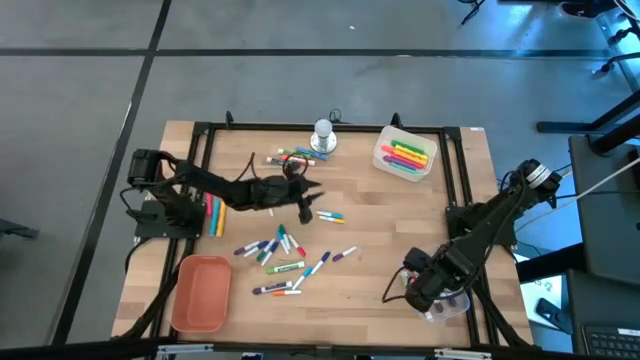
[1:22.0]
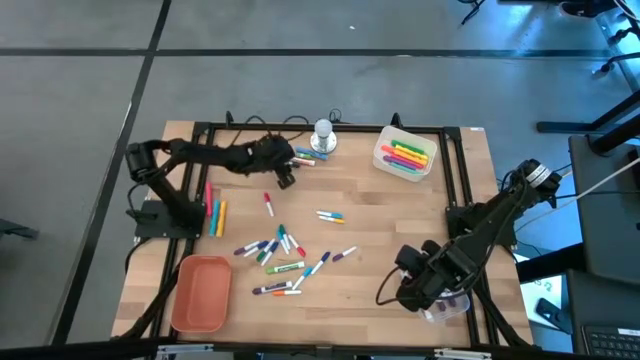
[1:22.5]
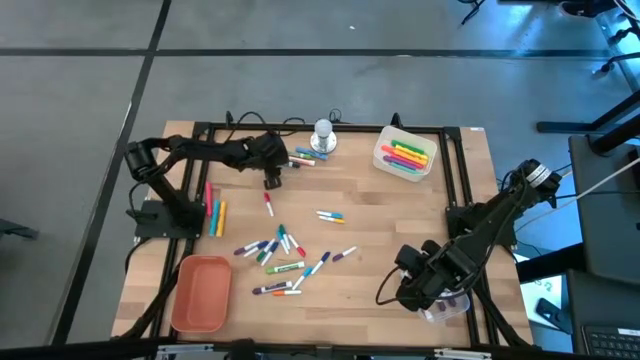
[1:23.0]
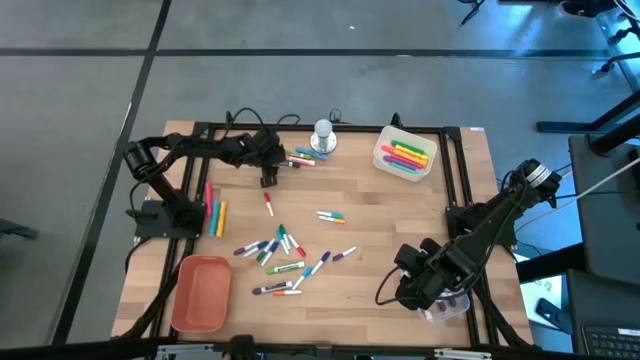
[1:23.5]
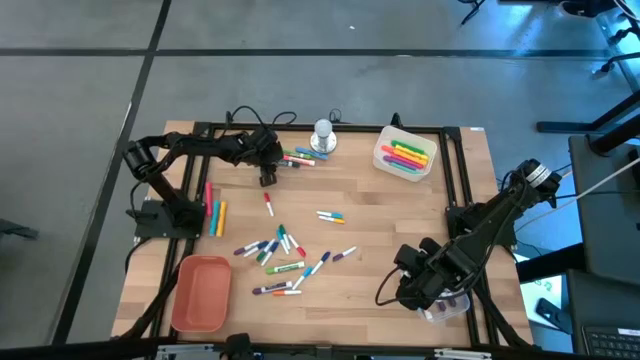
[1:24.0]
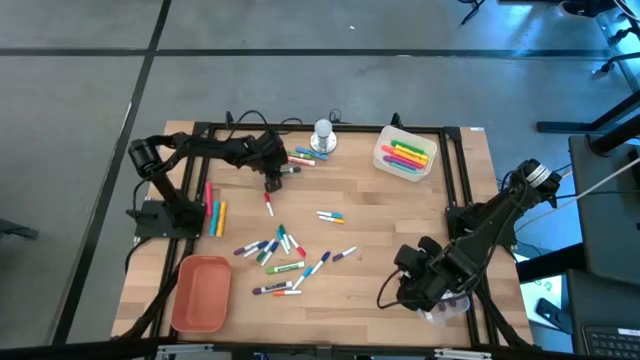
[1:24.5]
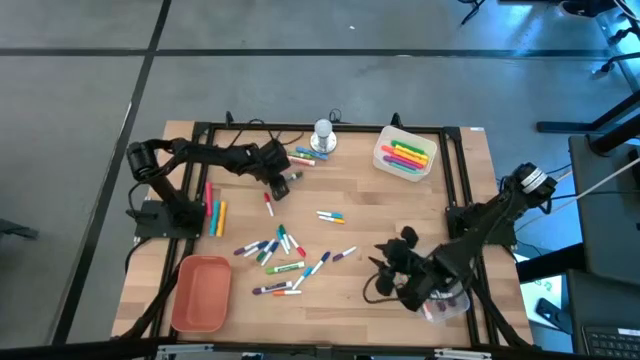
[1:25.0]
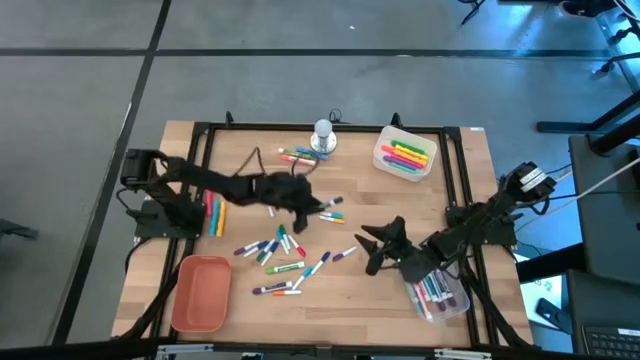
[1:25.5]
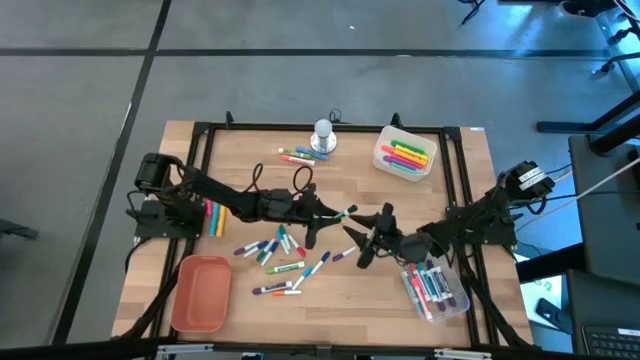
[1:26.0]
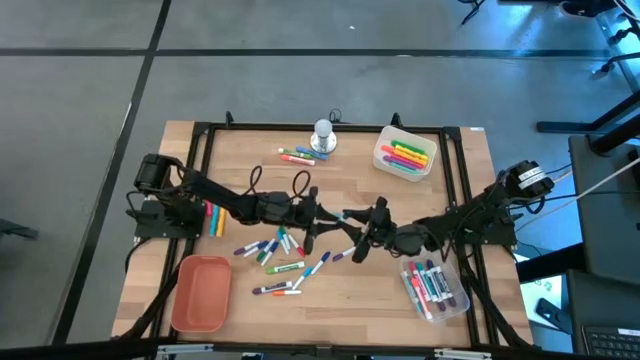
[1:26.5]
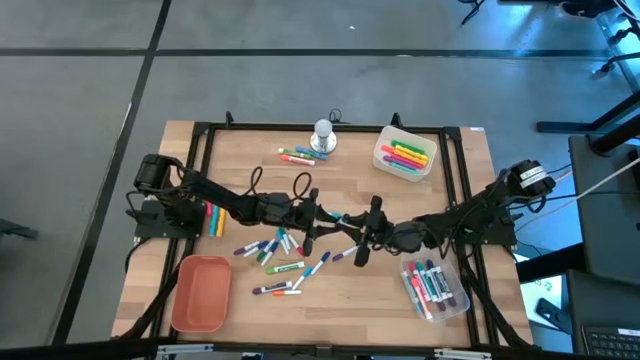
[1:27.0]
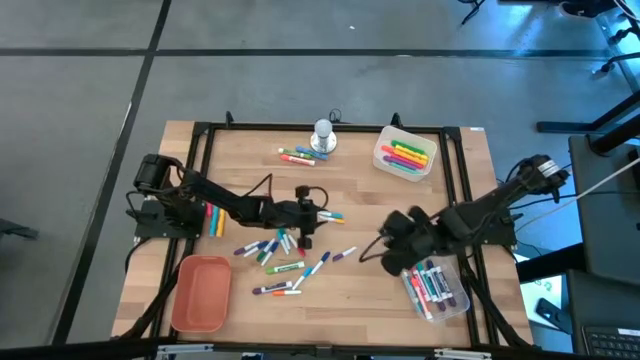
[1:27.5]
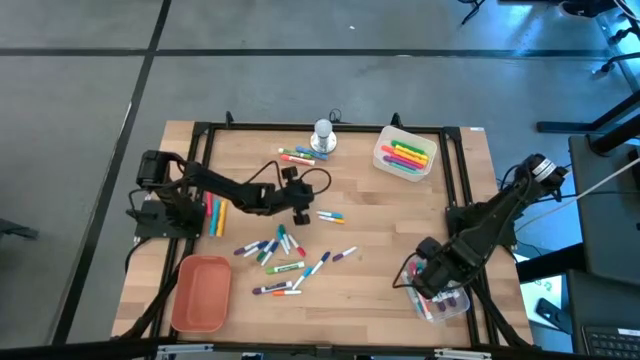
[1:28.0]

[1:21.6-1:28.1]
Task: Pick & Place Markers
Put the medium green marker pen into the transparent bin

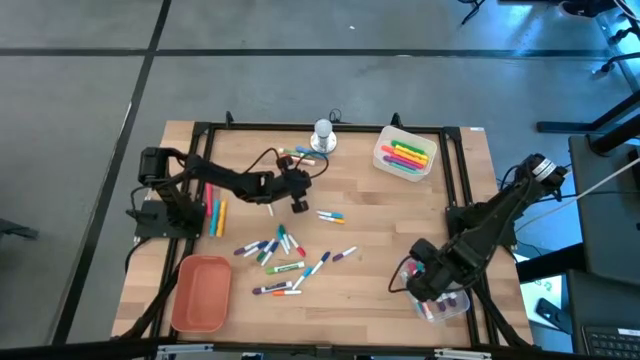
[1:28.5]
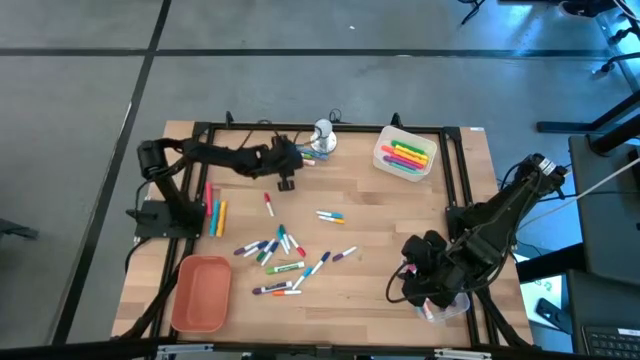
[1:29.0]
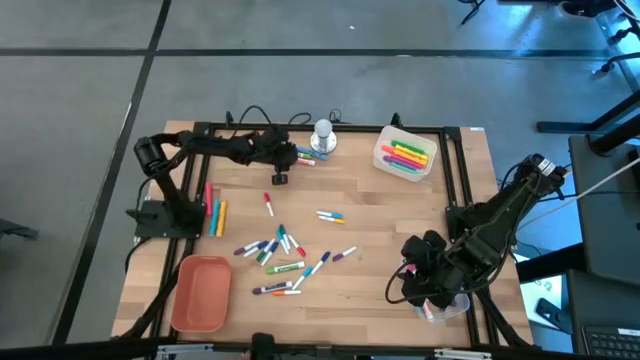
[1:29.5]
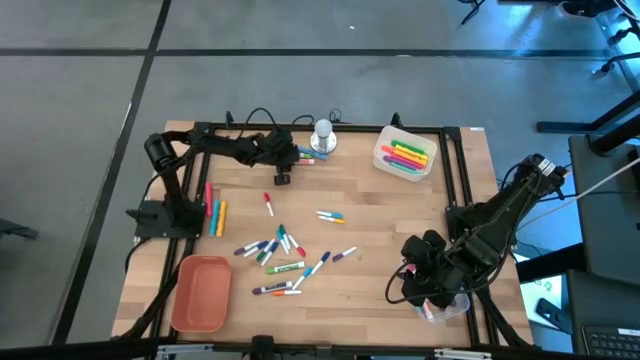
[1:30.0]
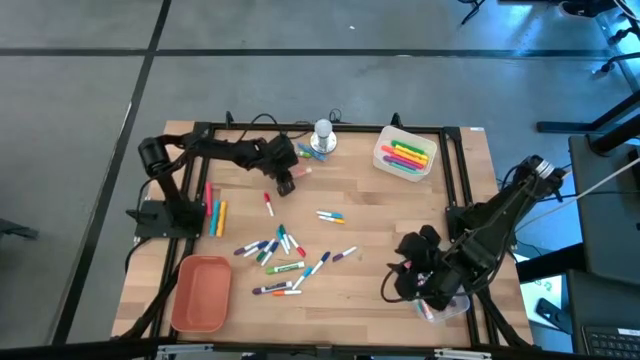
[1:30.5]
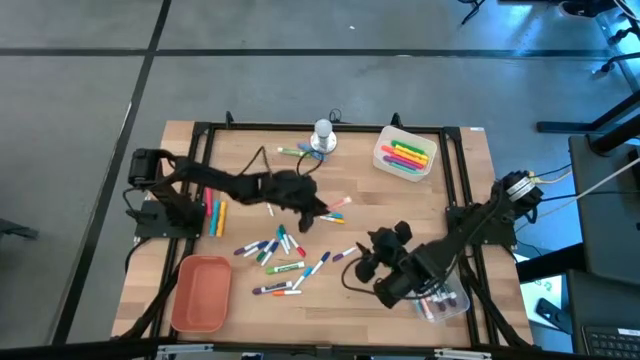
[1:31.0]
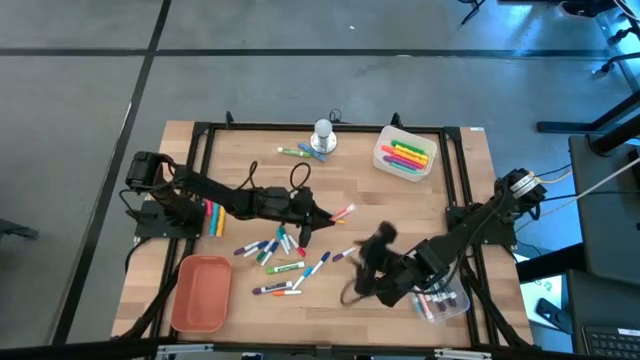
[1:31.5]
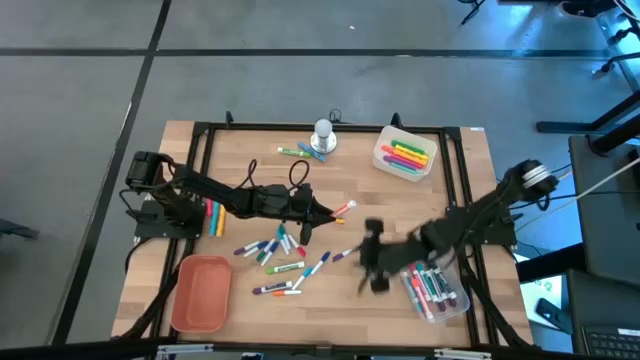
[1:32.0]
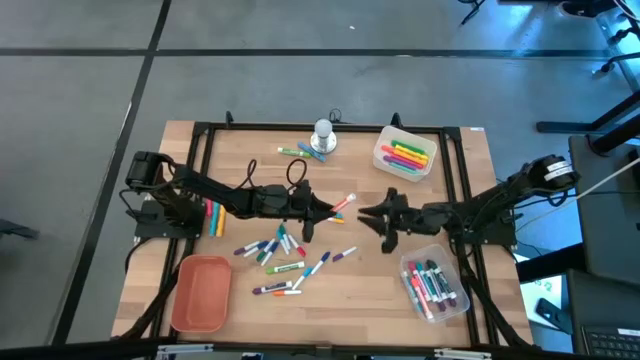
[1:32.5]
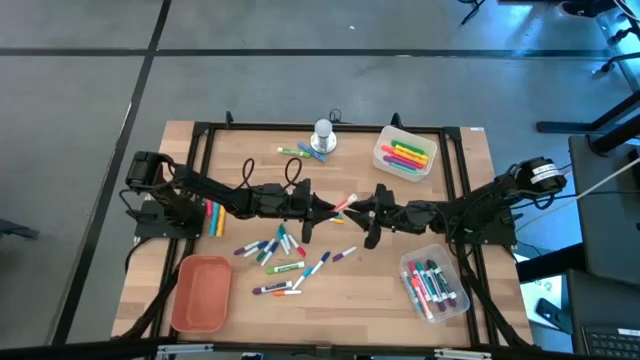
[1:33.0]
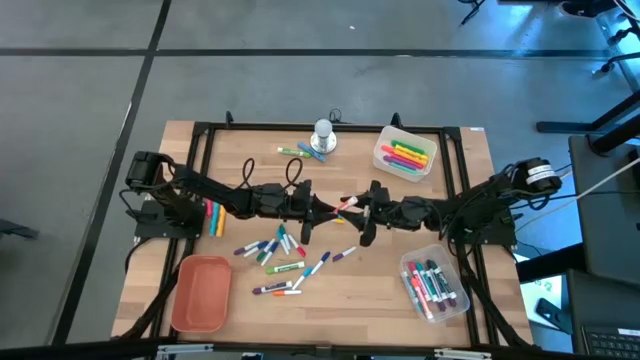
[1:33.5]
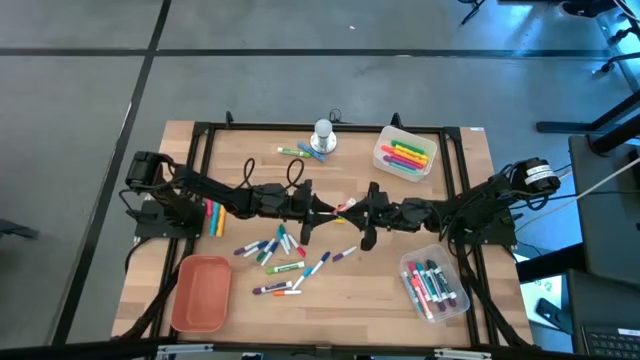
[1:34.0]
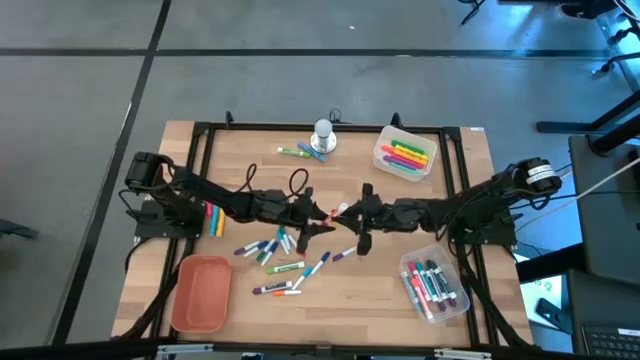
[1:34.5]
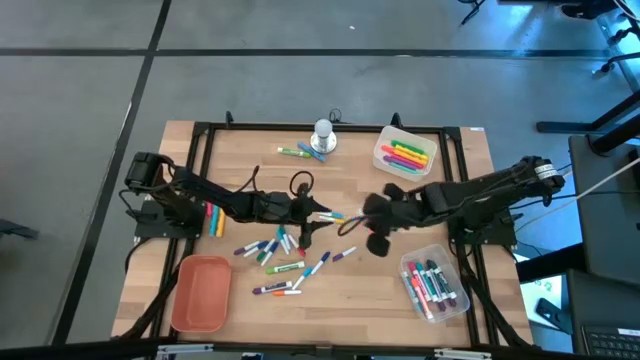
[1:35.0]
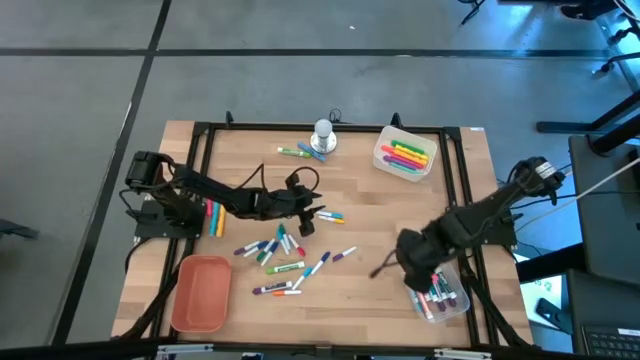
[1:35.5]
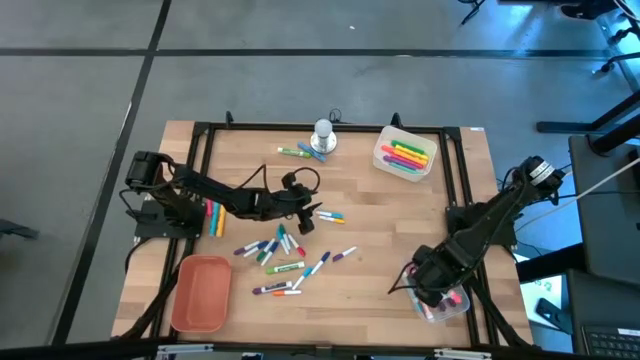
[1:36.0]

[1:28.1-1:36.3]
Put the medium orange marker pen into the transparent bin

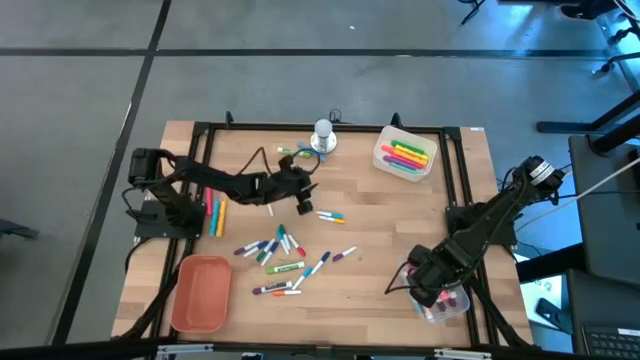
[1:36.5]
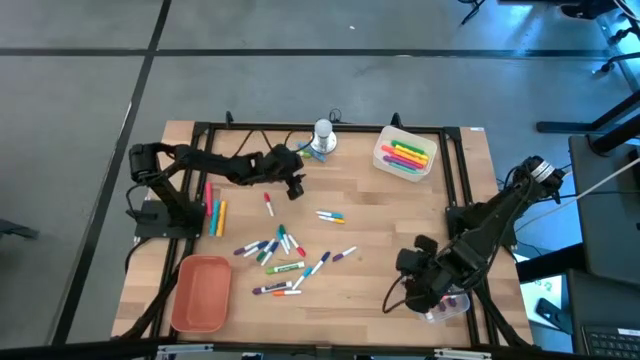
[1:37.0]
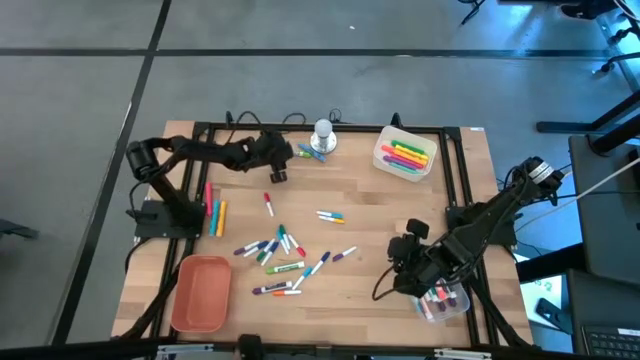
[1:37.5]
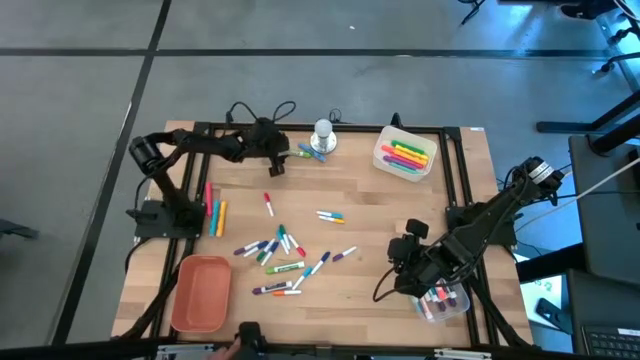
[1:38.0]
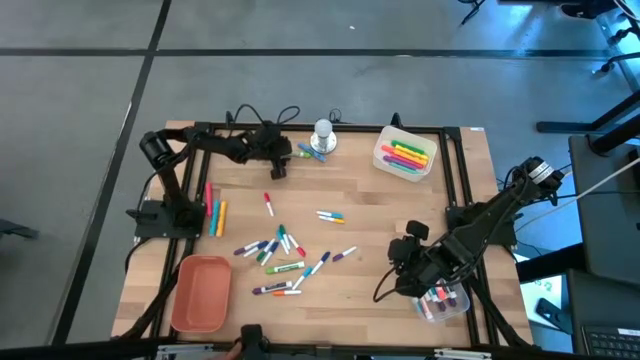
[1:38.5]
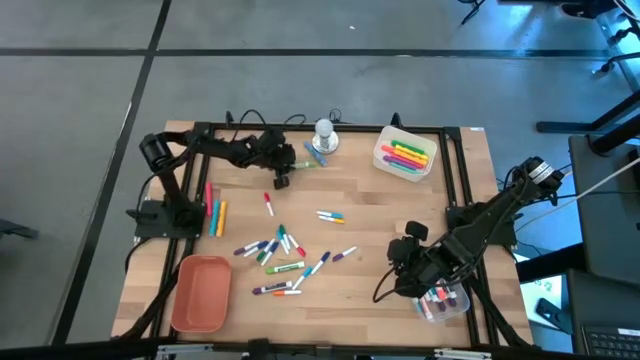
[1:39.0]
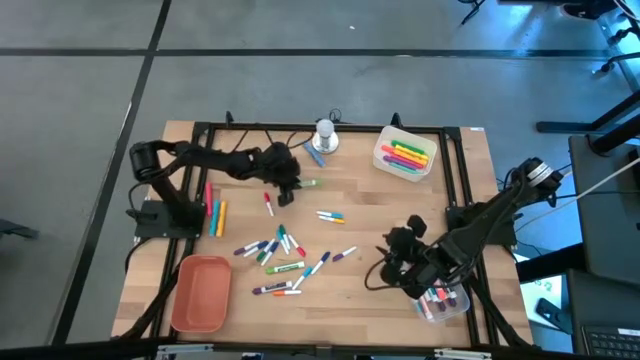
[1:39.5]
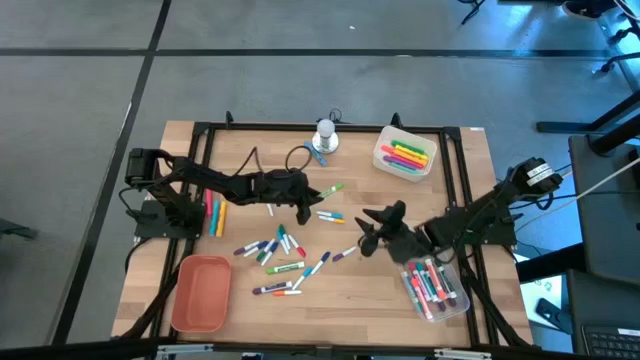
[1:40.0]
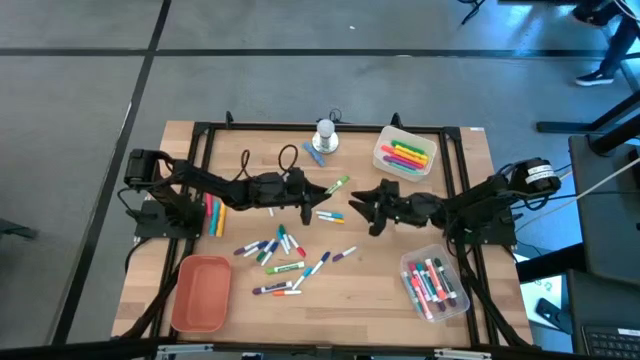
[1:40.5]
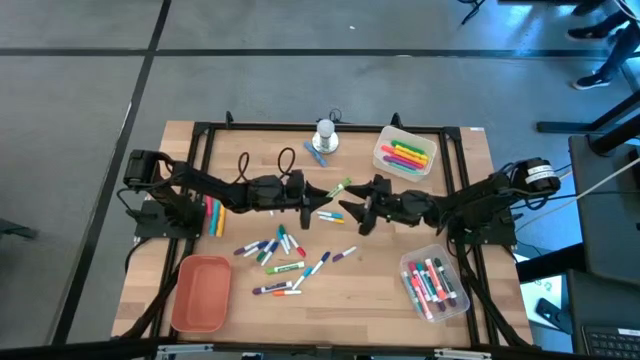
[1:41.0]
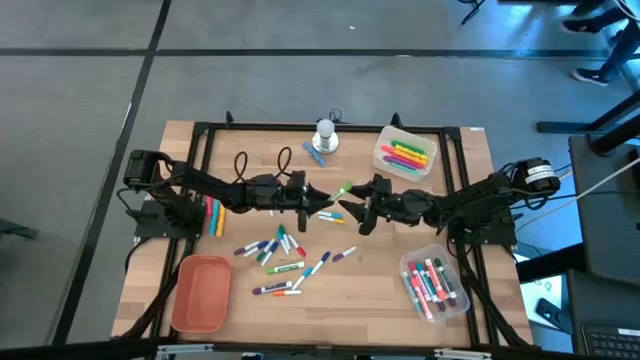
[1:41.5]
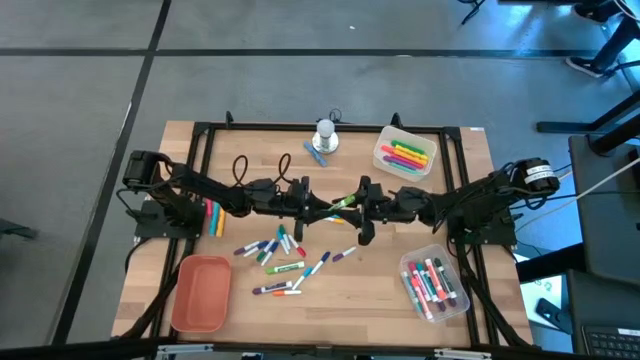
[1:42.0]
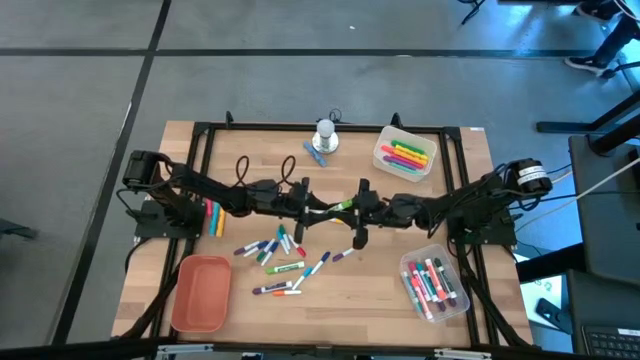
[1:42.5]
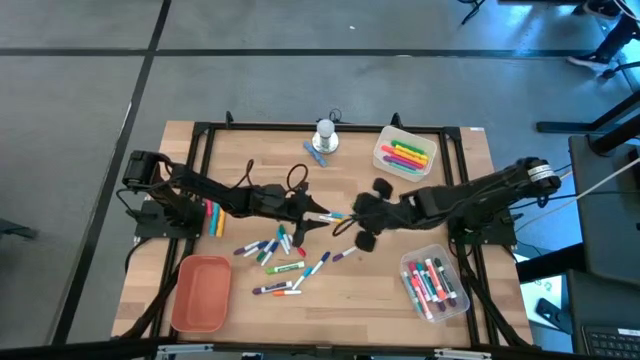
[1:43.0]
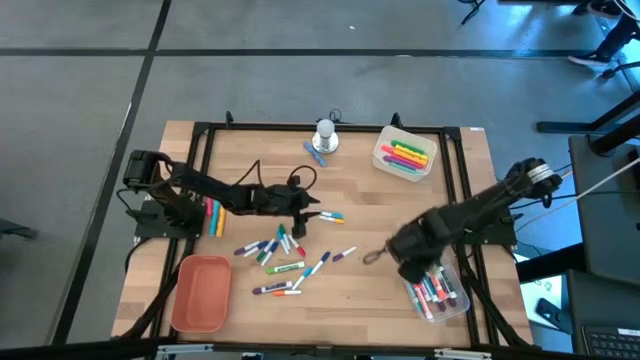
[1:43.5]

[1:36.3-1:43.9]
Put the medium light green marker pen into the transparent bin
